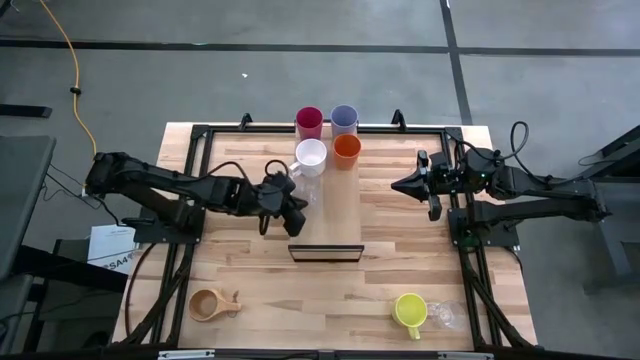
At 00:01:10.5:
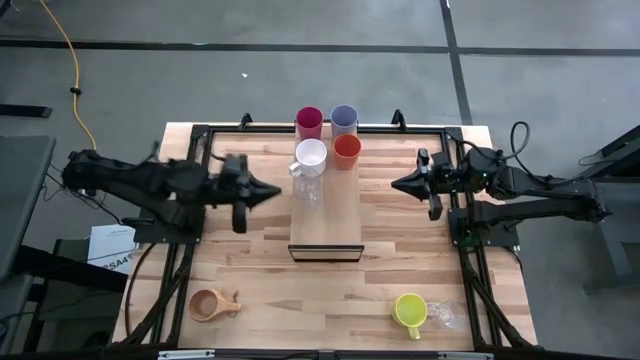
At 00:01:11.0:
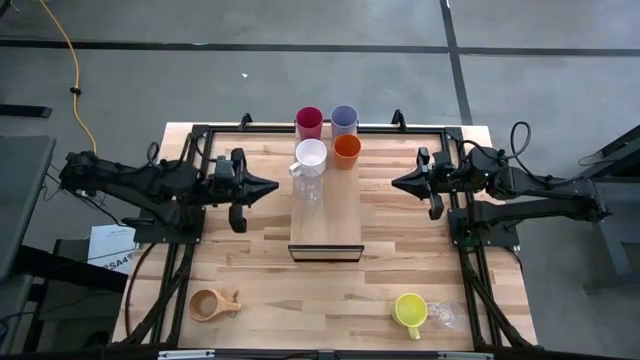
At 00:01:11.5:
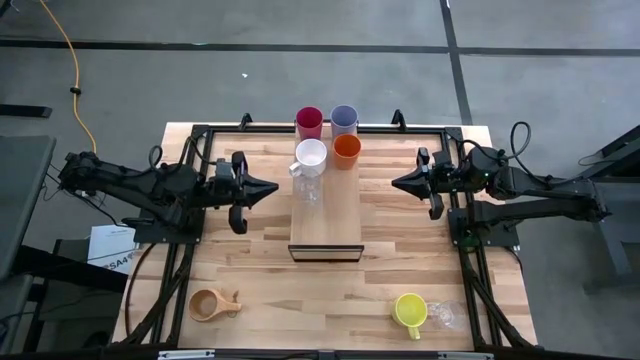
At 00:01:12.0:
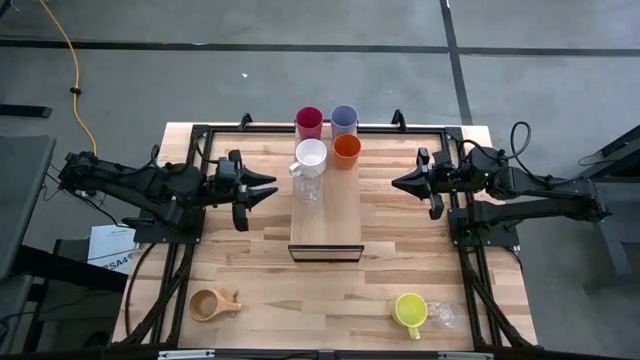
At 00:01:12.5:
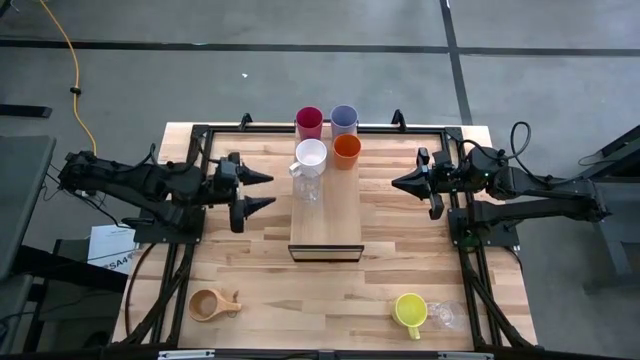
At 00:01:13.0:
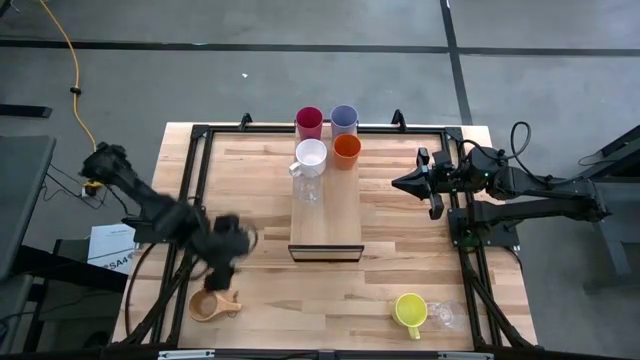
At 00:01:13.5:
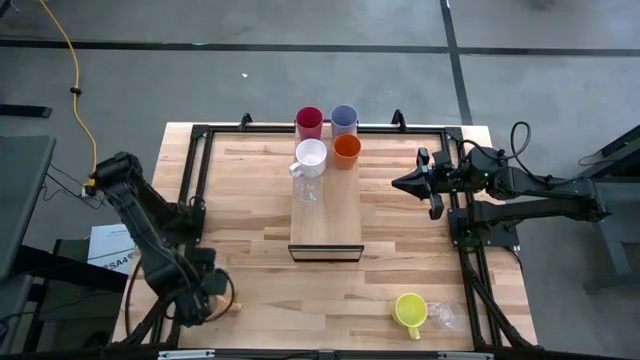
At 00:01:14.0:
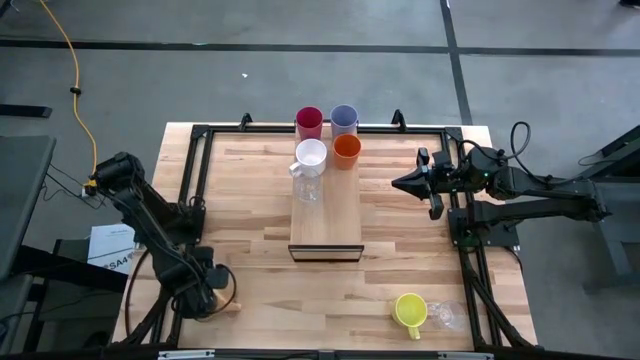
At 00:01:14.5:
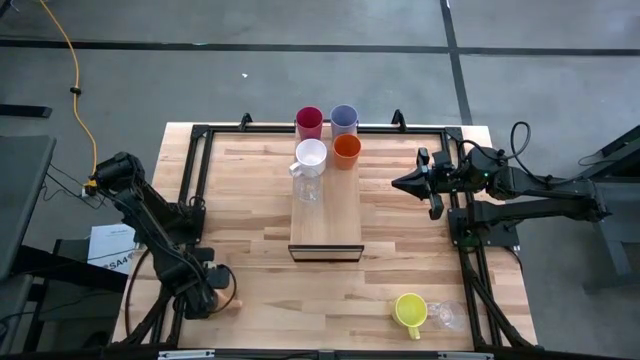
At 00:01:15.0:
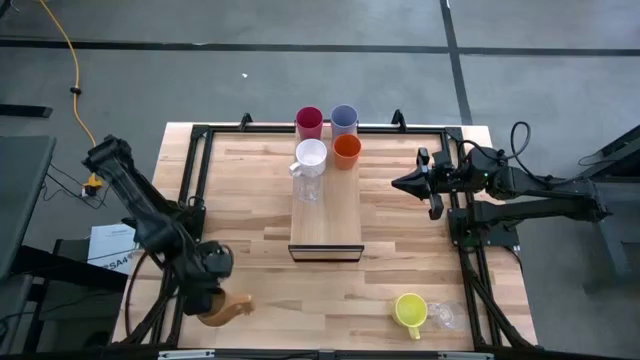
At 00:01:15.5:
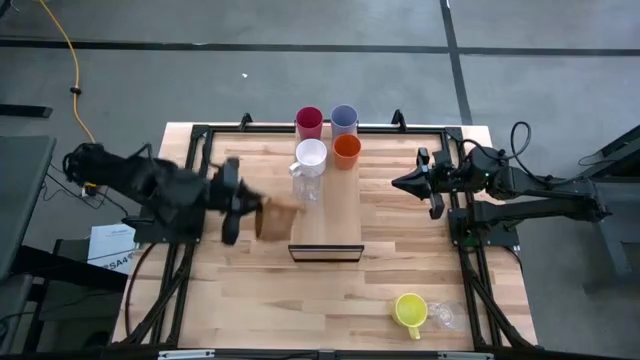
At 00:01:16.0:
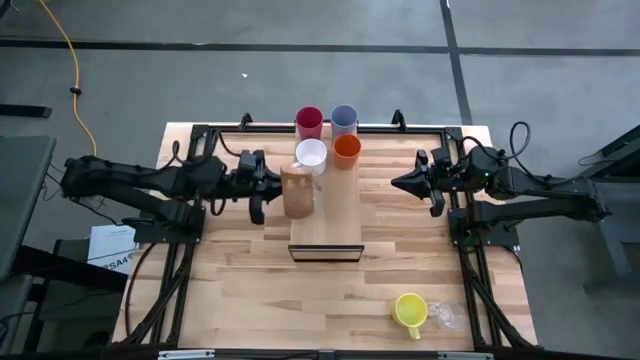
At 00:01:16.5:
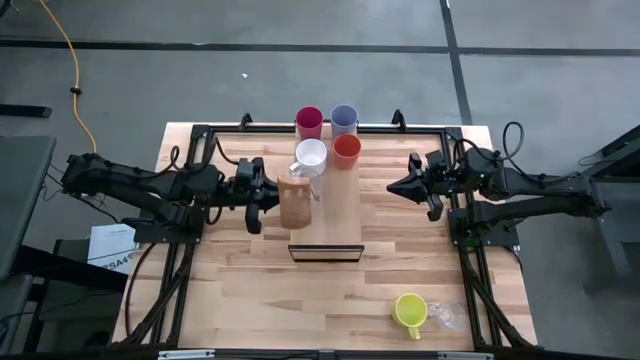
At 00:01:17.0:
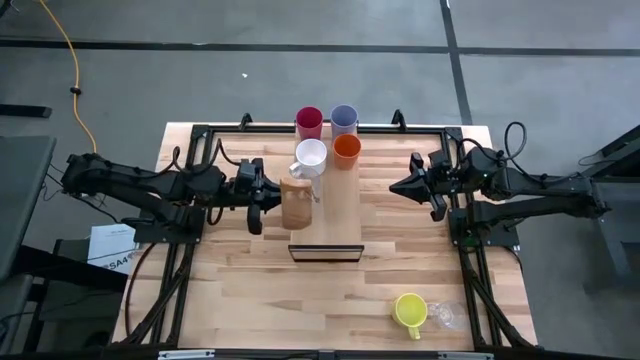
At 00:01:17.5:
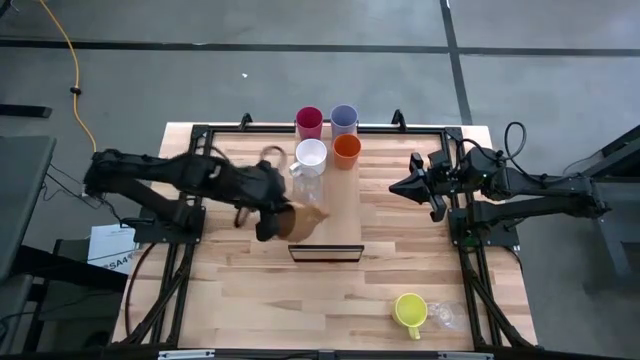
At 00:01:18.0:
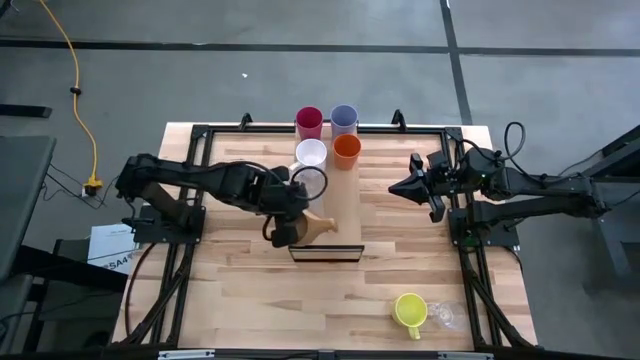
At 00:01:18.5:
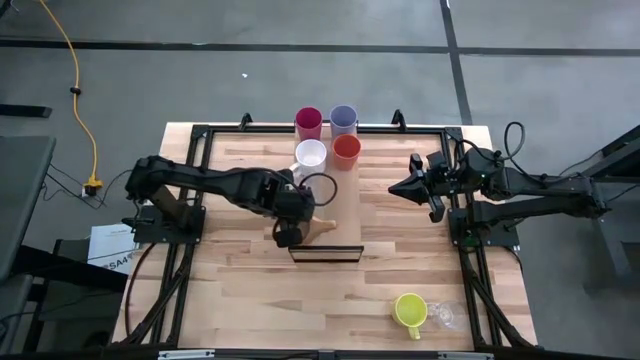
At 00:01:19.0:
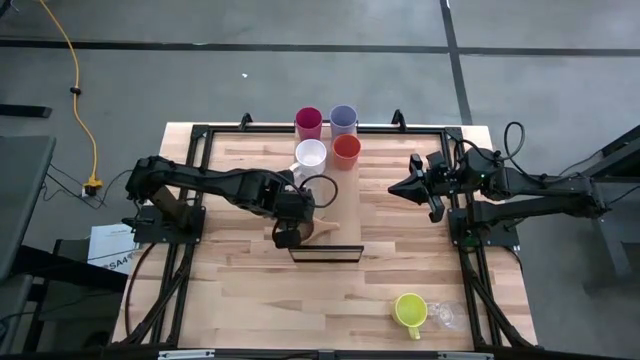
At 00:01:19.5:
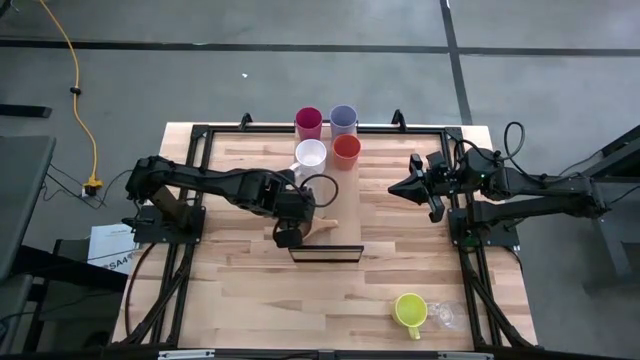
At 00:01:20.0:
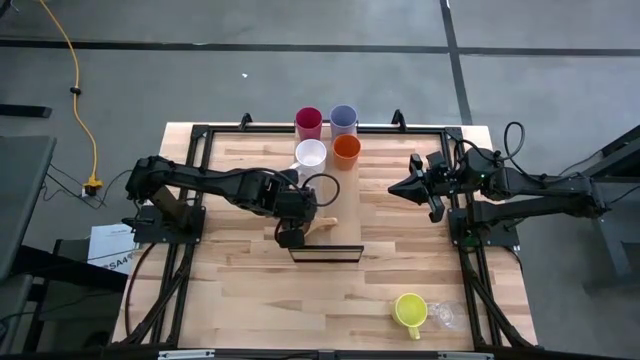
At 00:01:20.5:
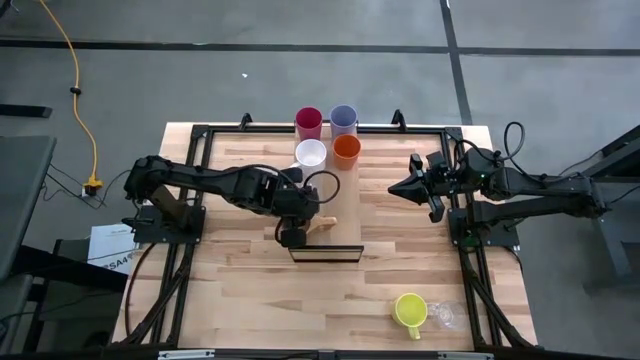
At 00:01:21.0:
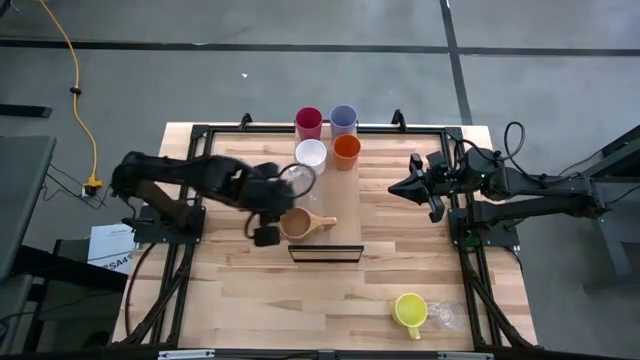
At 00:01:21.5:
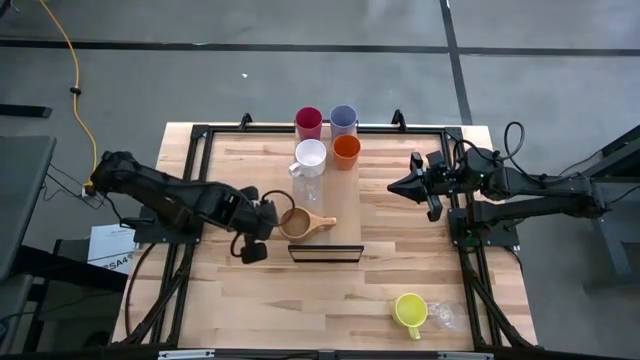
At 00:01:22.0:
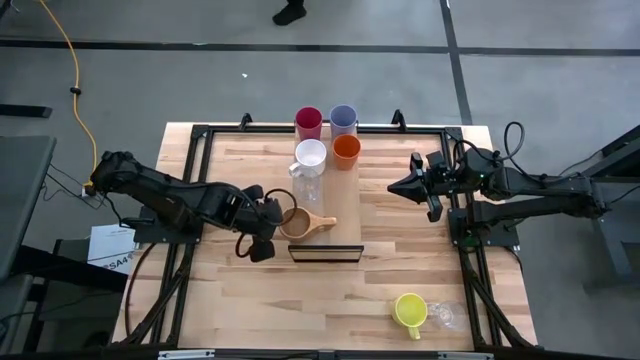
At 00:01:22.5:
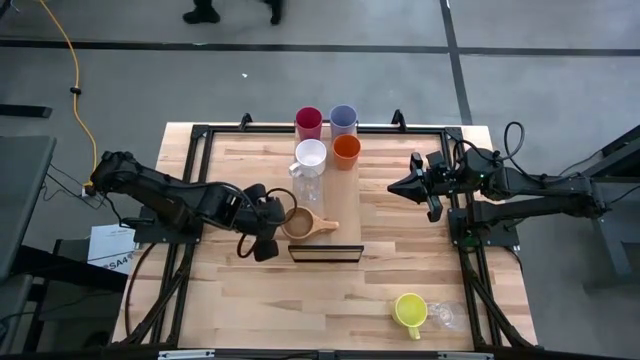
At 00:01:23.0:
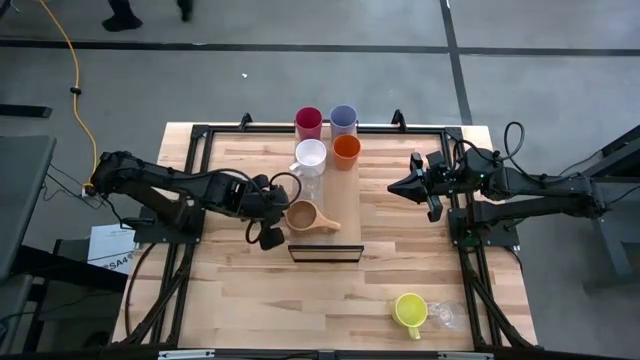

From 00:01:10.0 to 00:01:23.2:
Task: Stack small to large cups/mugs on shelf
Put the wooden mug on the shelf

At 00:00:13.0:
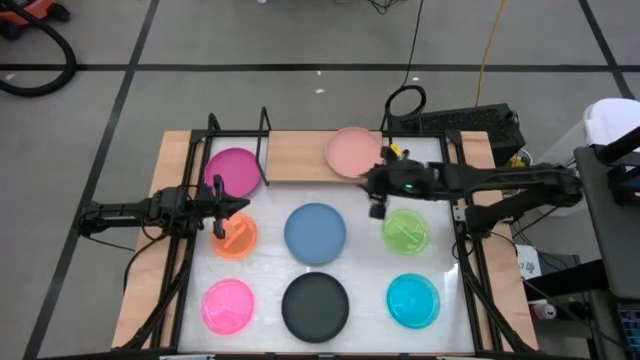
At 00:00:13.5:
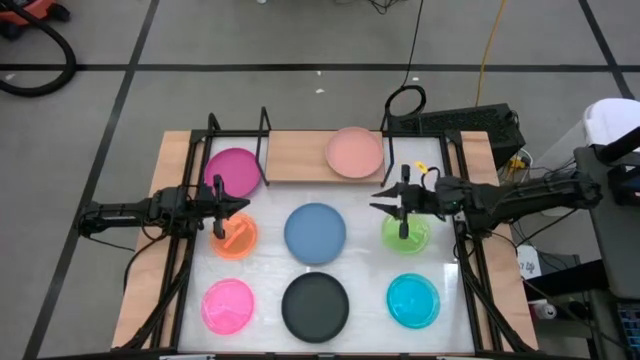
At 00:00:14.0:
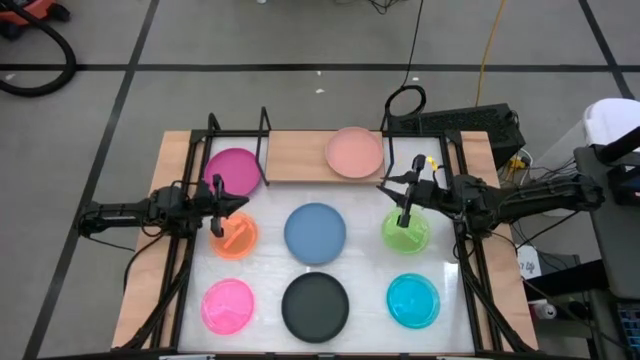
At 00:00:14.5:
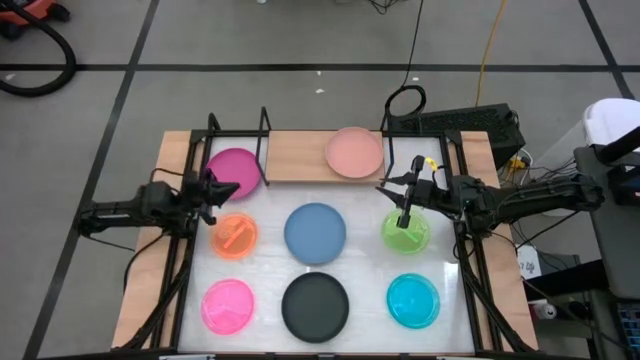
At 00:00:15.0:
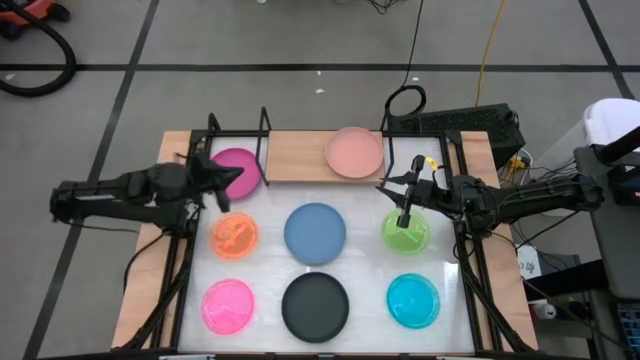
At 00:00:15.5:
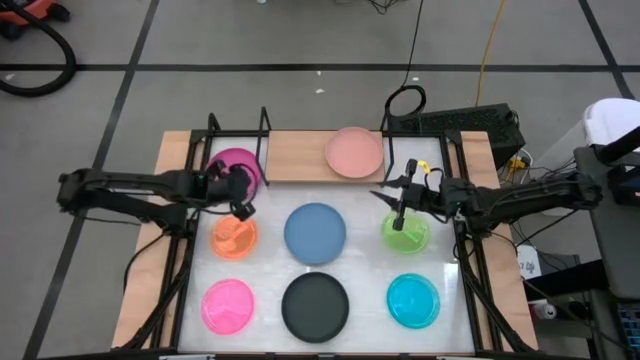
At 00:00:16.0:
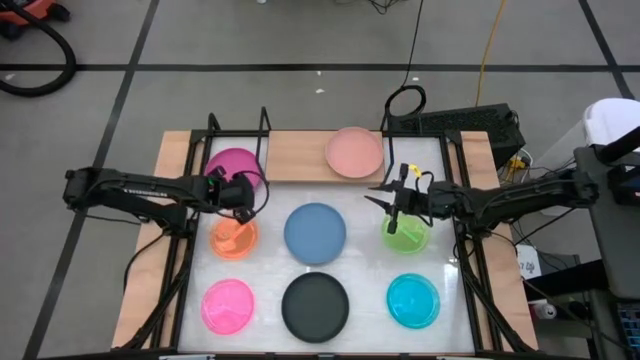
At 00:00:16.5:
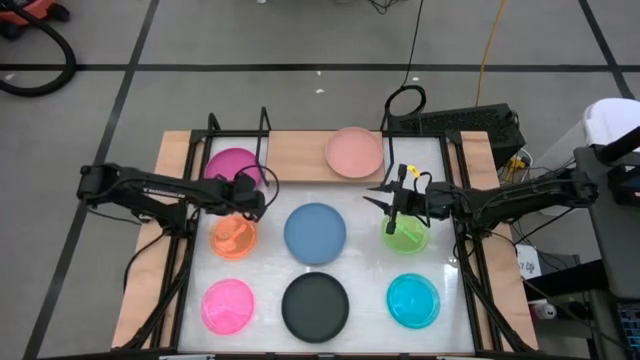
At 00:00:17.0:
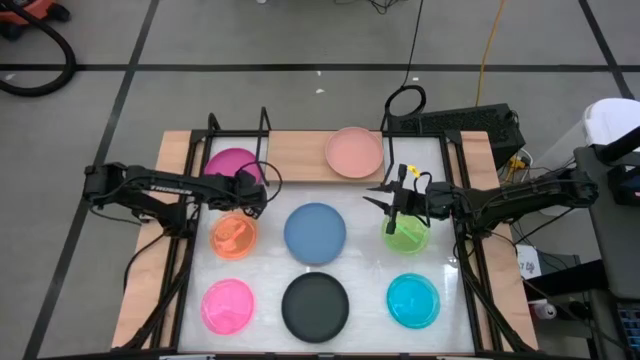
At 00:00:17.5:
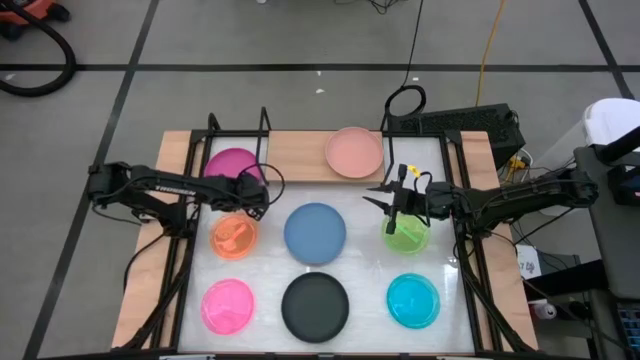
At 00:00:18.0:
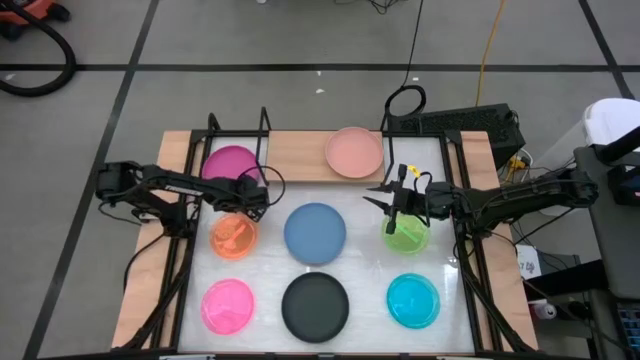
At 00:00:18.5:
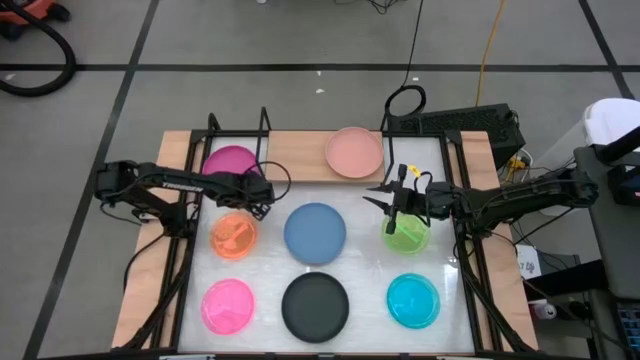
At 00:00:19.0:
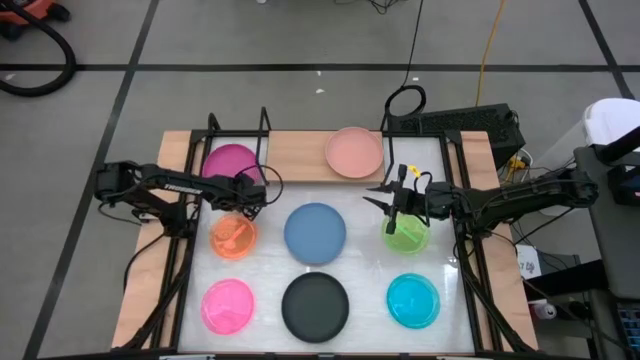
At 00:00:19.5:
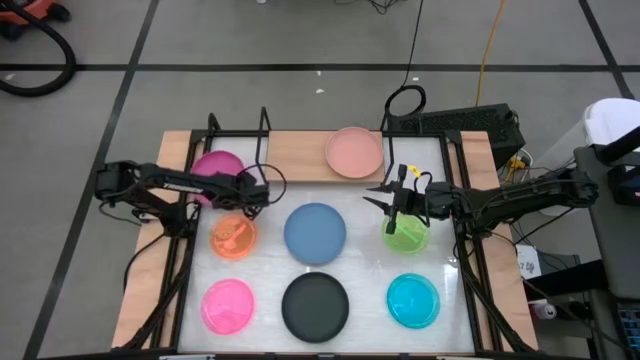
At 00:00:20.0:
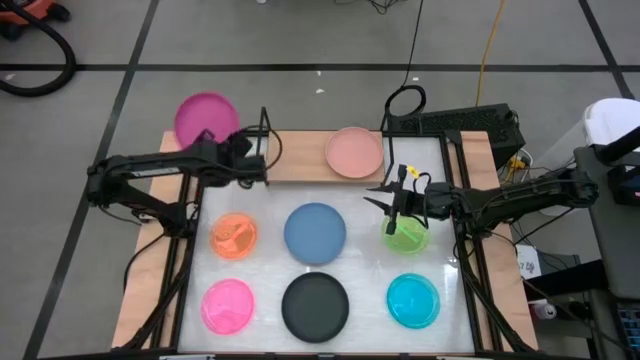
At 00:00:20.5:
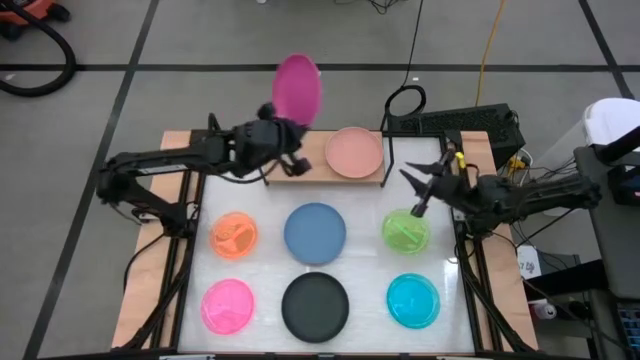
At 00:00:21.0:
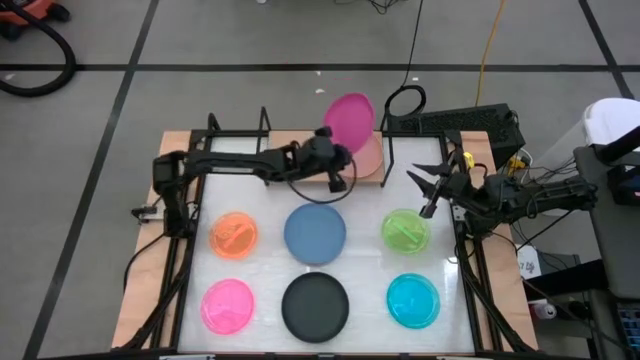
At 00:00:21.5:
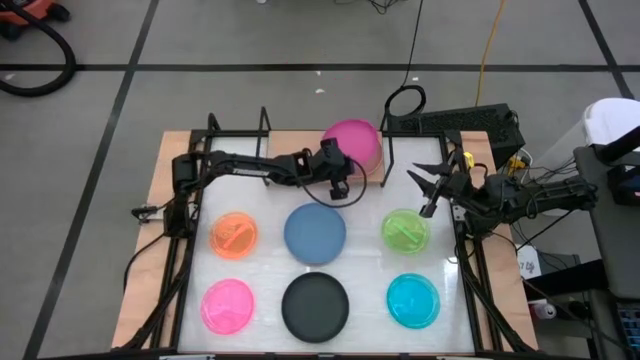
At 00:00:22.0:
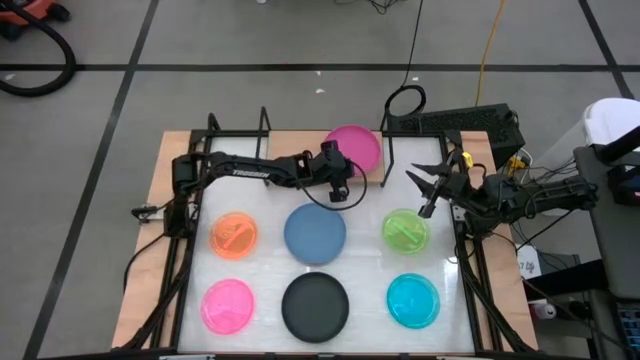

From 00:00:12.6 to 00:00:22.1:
Task: Place and stack plates onto a shelf
Stack the pink plate on top of the orange plate on the shelf
